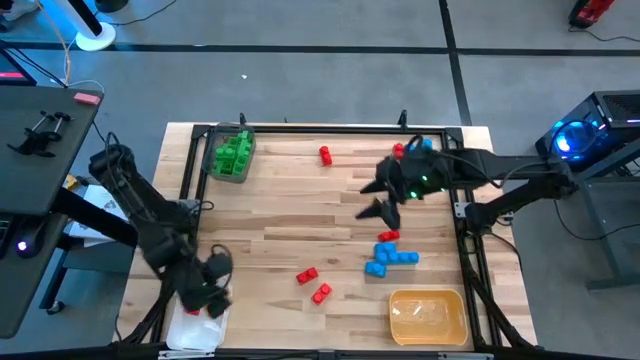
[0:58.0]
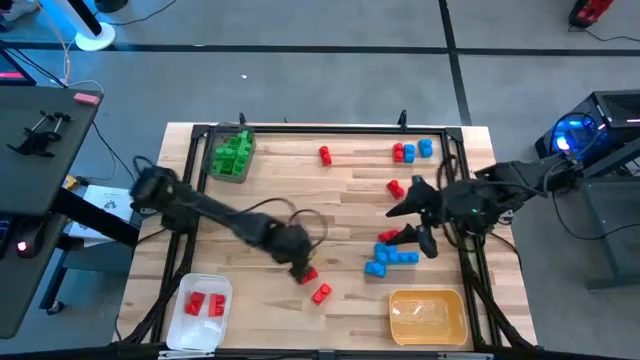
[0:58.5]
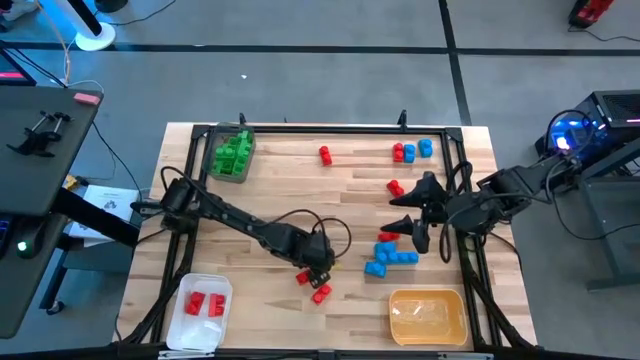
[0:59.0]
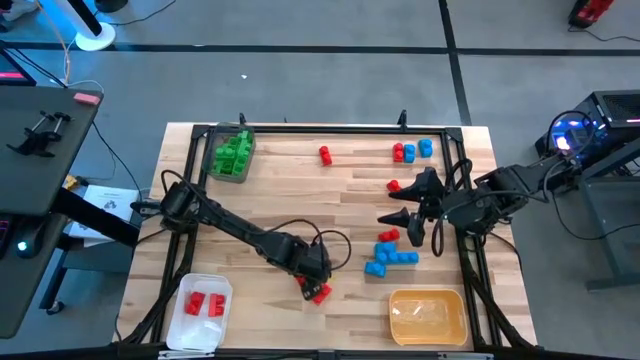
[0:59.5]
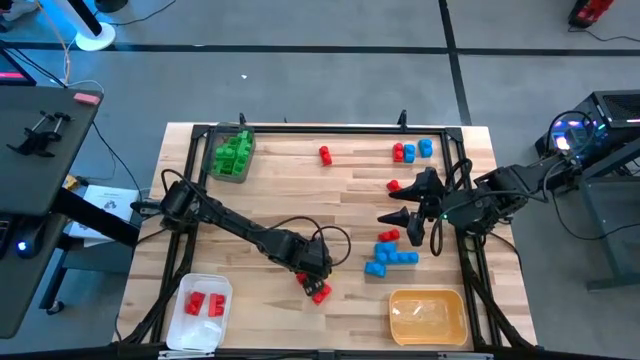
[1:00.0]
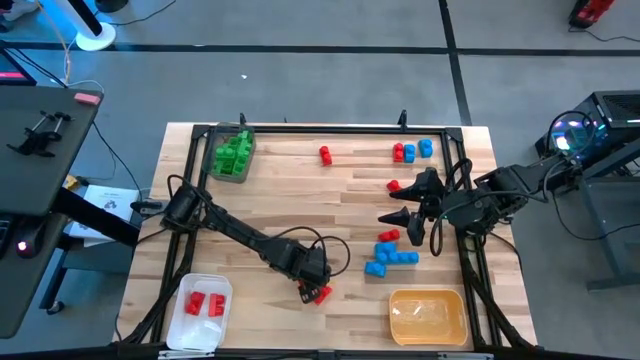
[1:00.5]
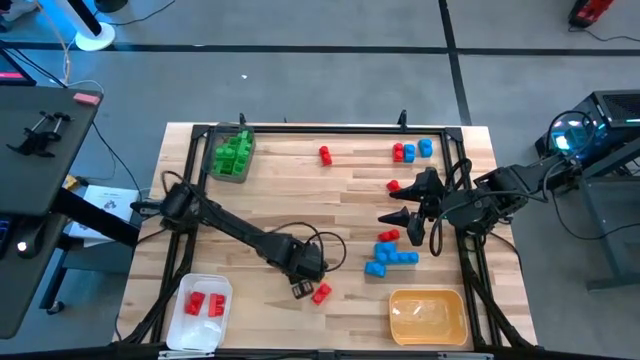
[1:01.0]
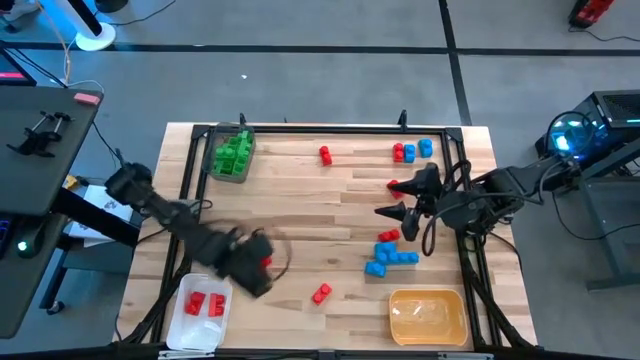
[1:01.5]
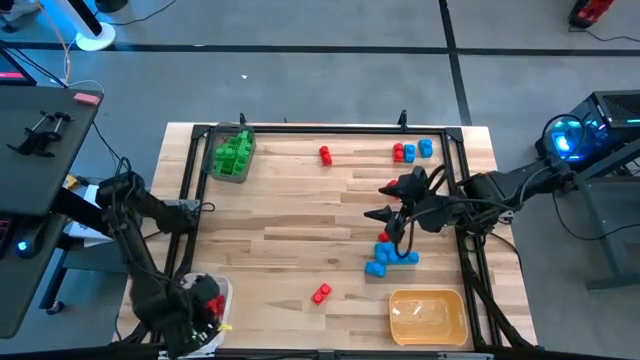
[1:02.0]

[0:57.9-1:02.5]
Task: Sort blocks
Put the red game piece into the white bin

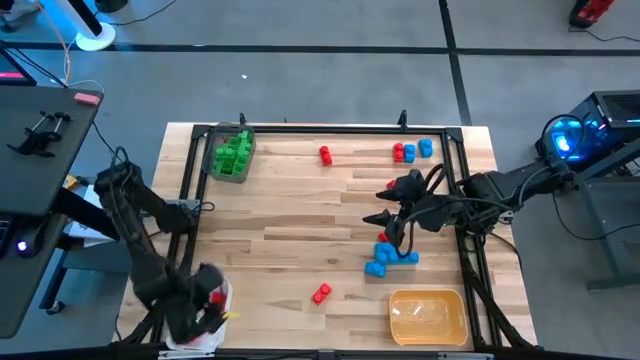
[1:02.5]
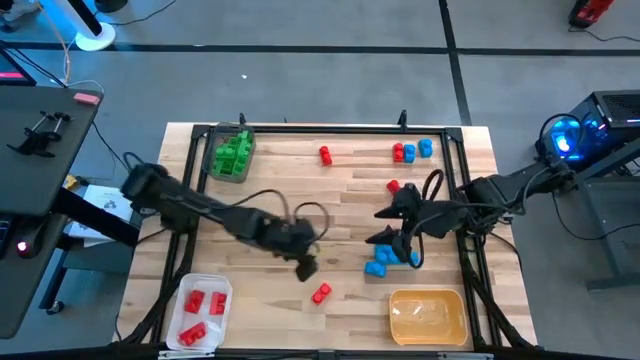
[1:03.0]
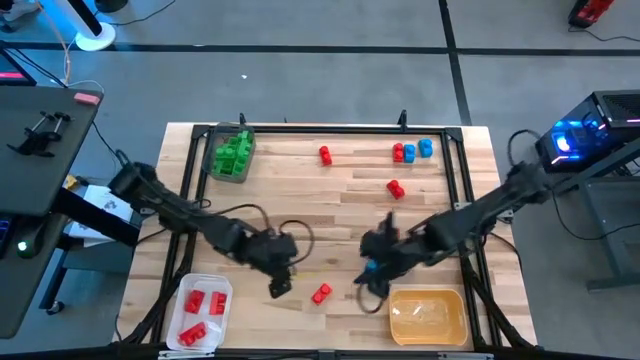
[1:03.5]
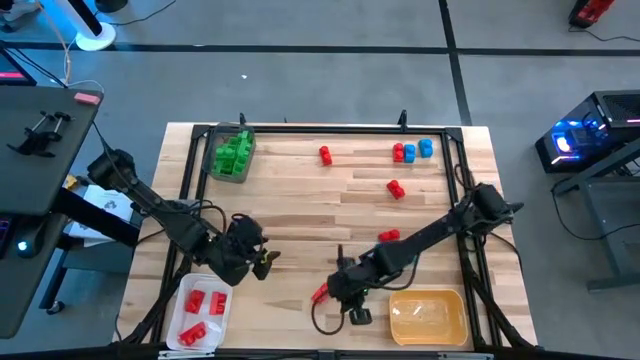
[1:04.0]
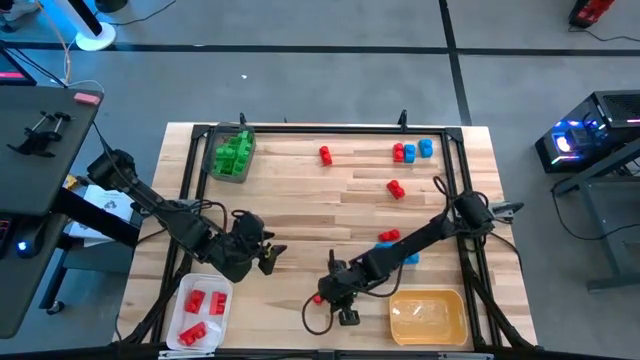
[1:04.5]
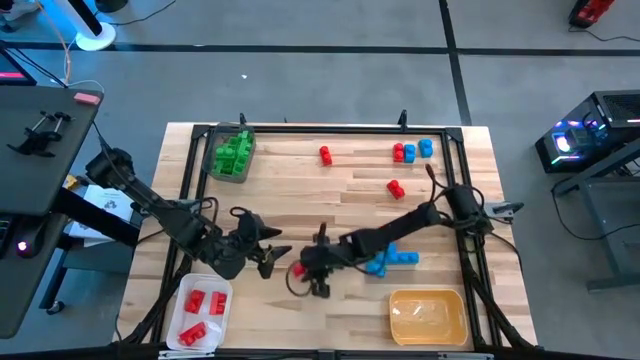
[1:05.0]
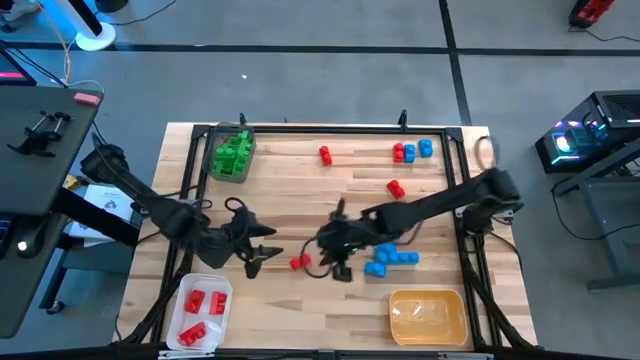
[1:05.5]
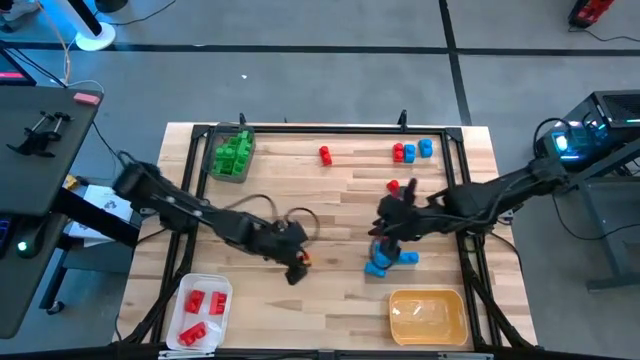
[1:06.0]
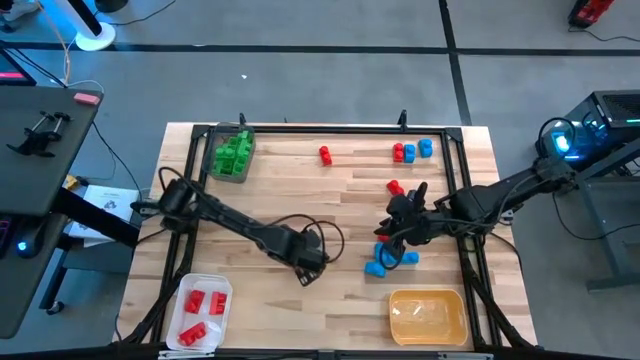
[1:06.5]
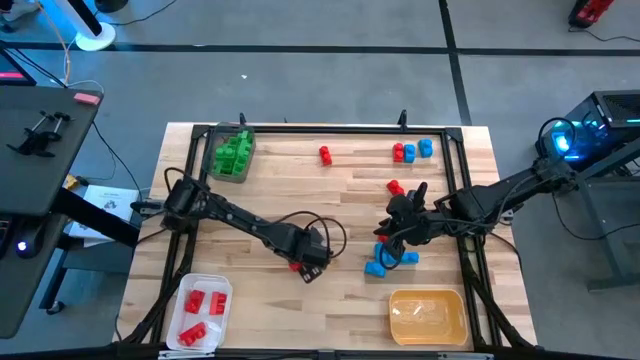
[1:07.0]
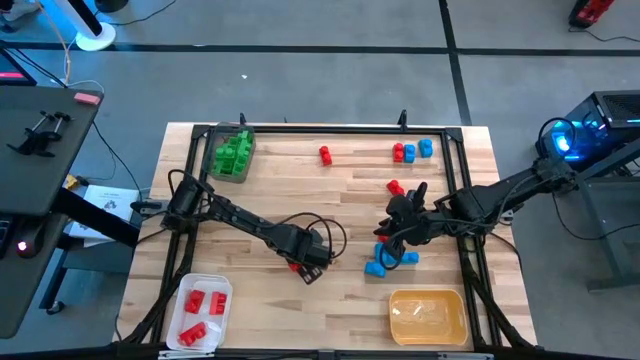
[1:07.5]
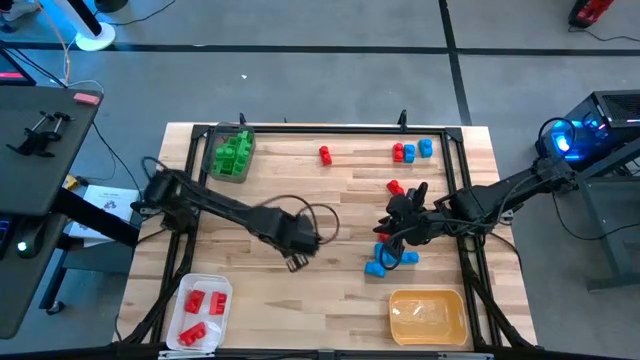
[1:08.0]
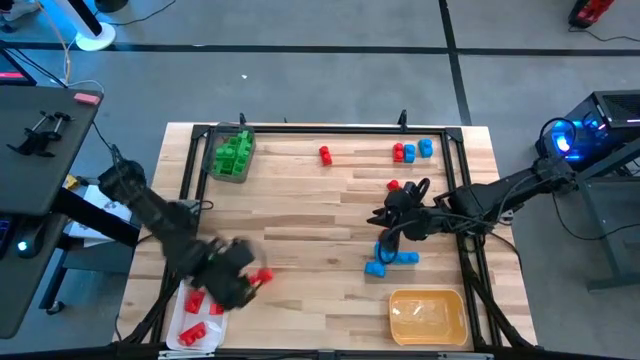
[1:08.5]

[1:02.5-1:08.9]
Put the red game piece into the white bin

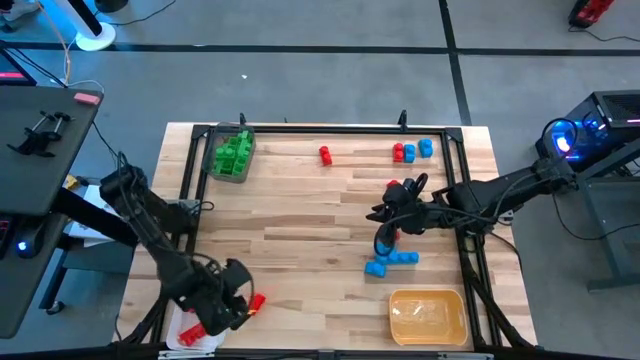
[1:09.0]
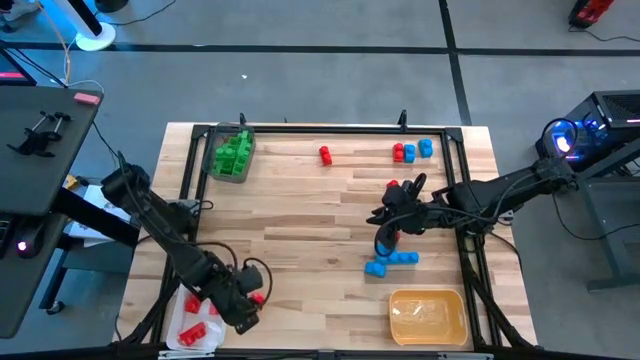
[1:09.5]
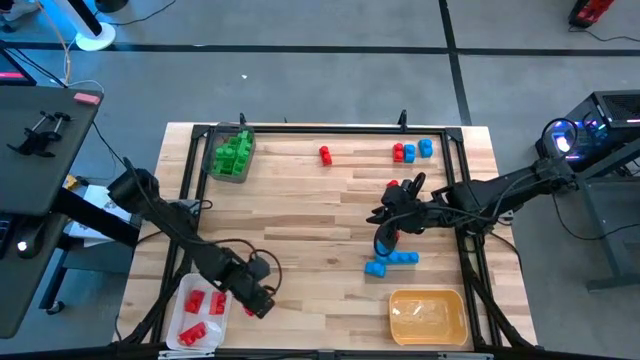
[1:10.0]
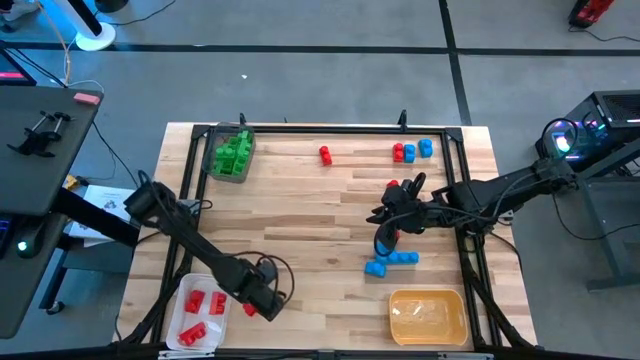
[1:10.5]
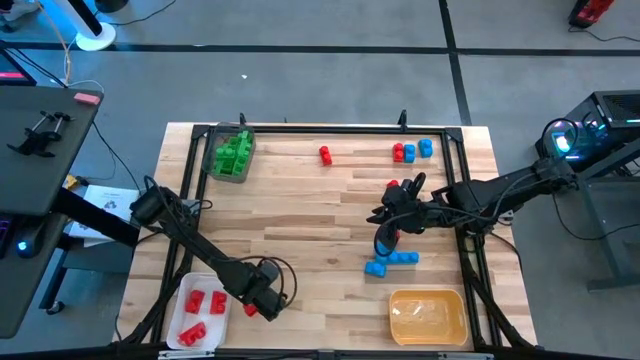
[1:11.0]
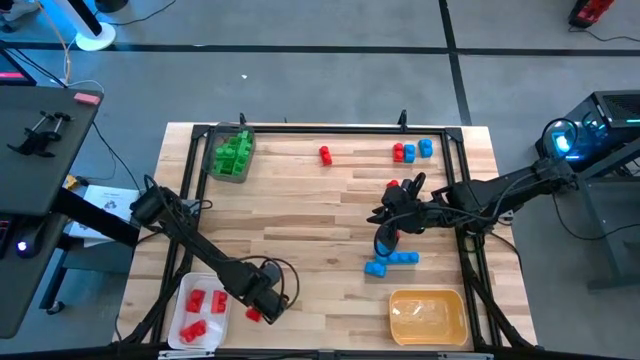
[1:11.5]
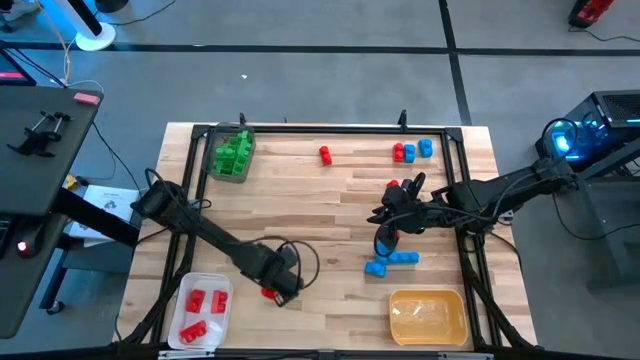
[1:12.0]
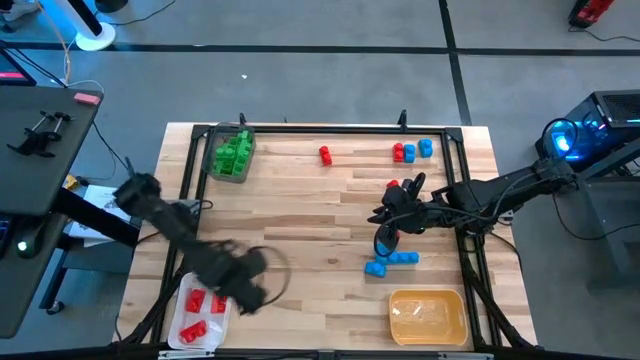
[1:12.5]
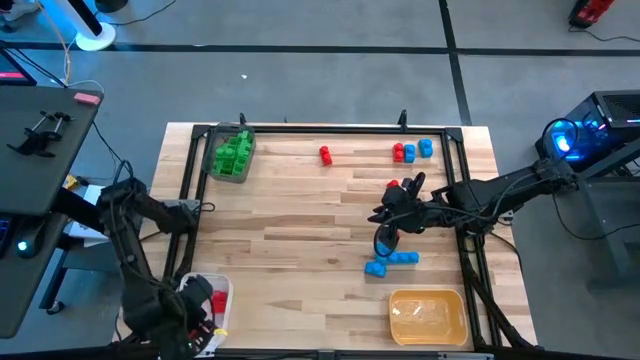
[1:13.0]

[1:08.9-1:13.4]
Put the red game piece into the white bin

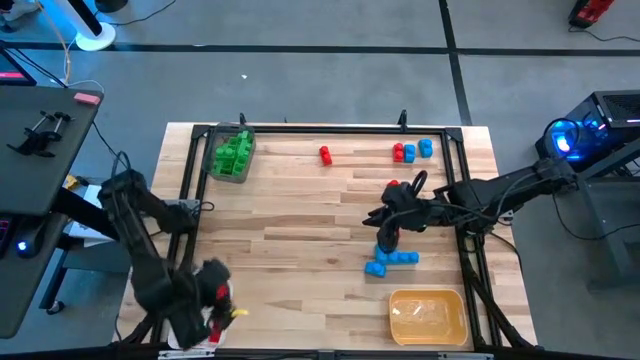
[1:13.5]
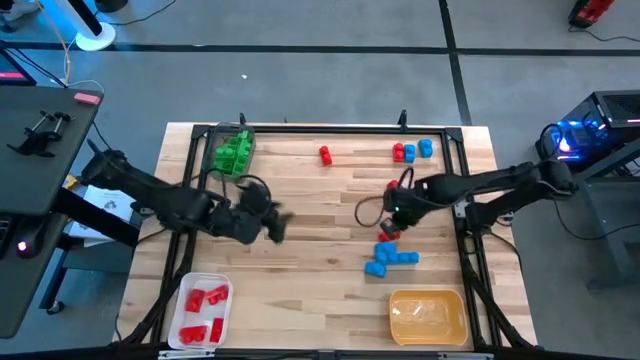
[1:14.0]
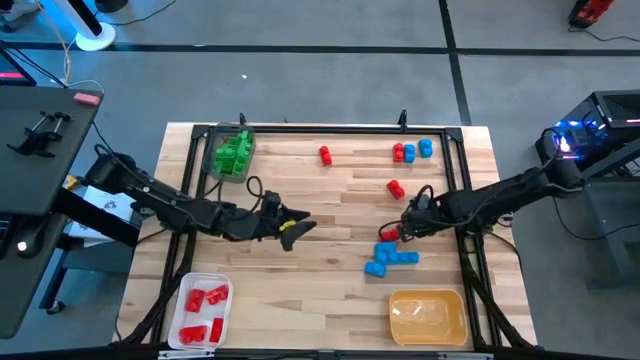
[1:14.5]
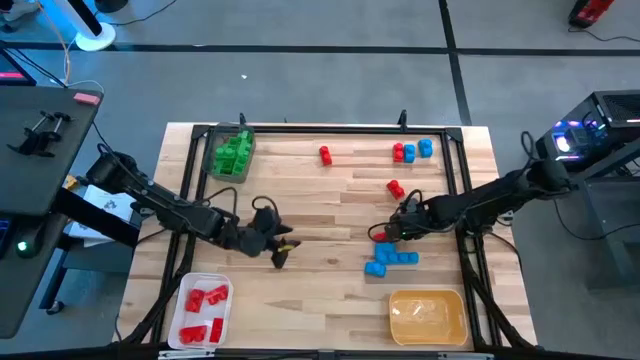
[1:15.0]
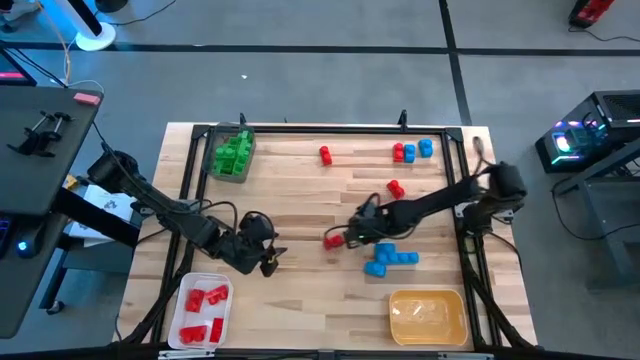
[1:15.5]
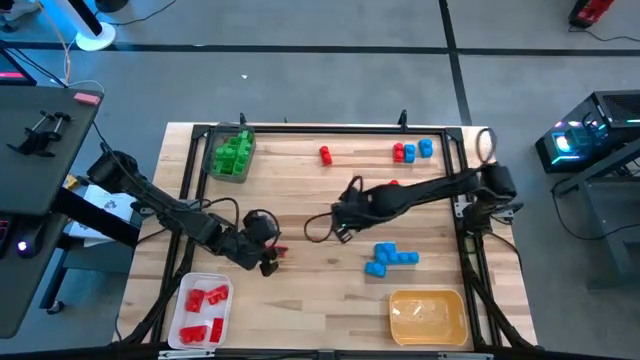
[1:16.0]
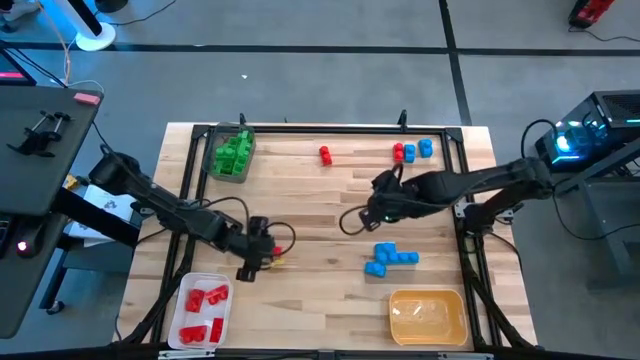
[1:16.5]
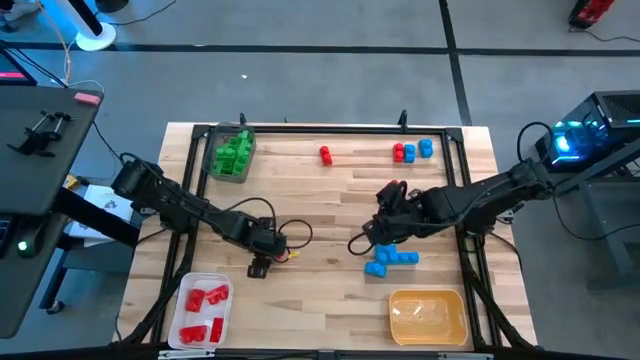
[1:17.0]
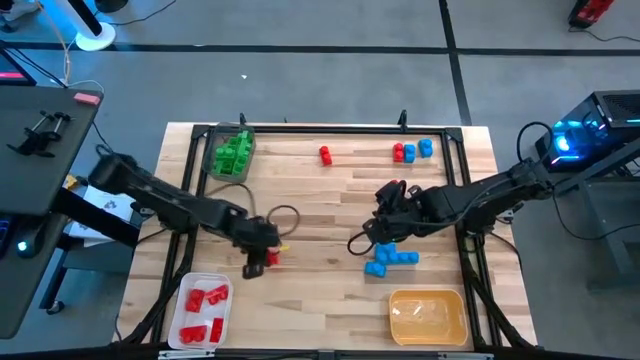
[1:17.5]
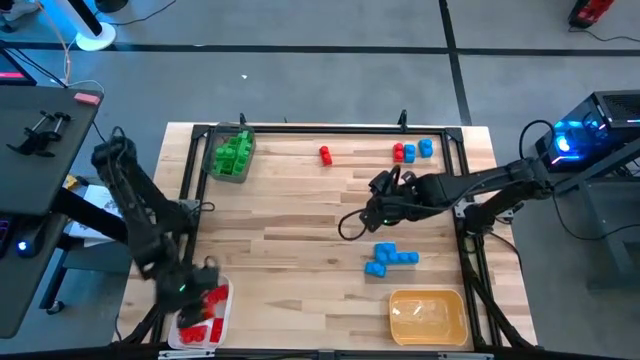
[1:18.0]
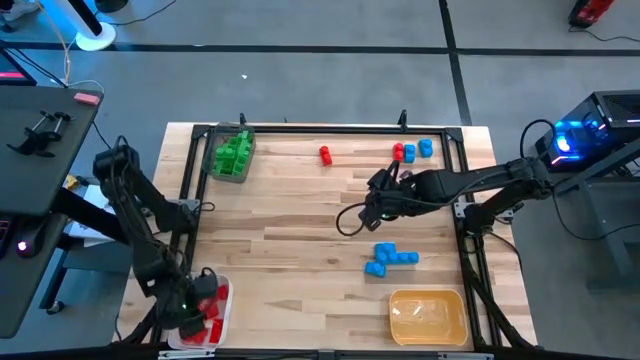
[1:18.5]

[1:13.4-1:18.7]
Put the red game piece into the white bin
